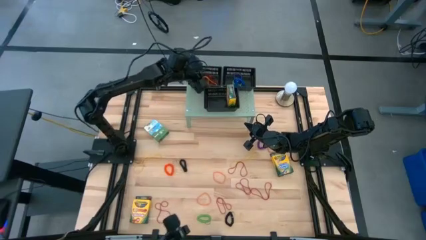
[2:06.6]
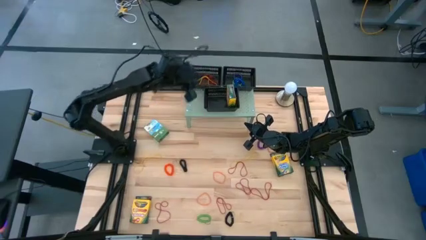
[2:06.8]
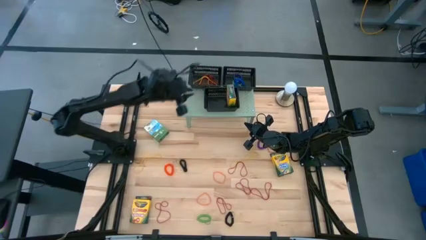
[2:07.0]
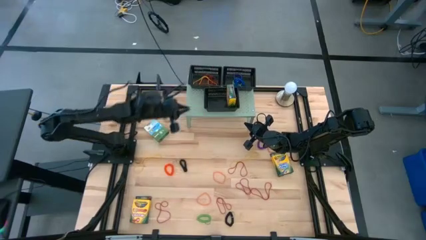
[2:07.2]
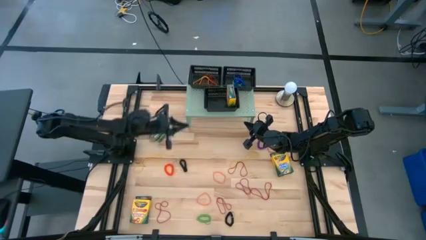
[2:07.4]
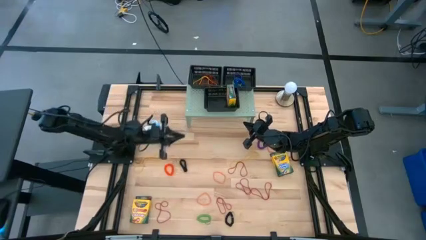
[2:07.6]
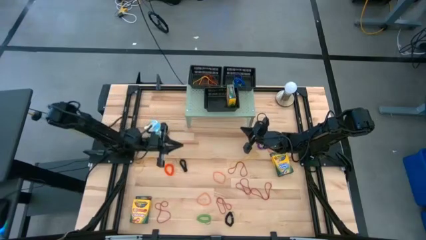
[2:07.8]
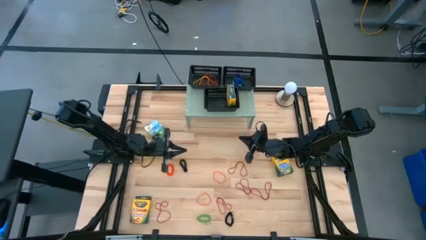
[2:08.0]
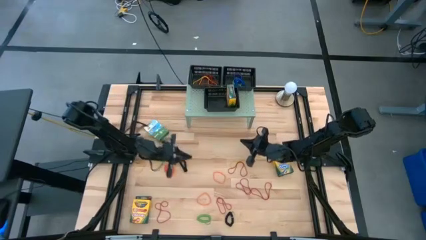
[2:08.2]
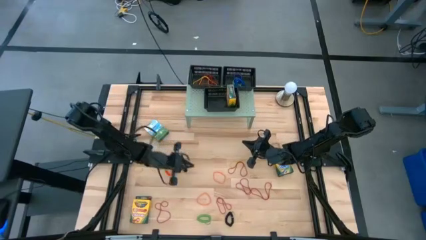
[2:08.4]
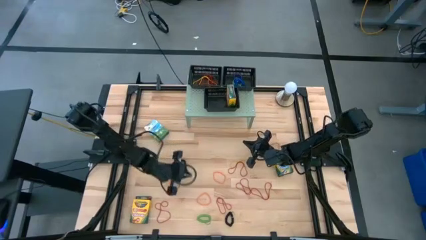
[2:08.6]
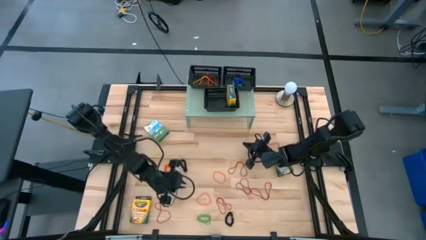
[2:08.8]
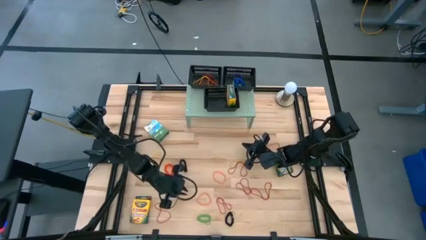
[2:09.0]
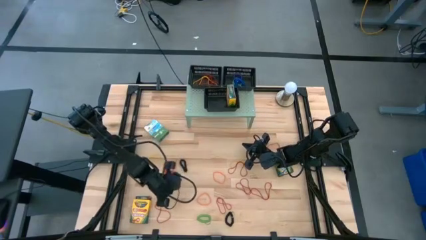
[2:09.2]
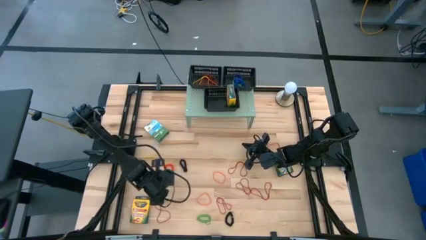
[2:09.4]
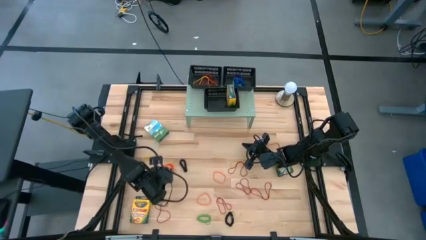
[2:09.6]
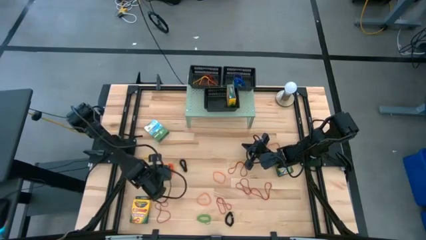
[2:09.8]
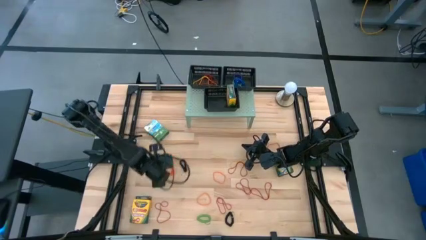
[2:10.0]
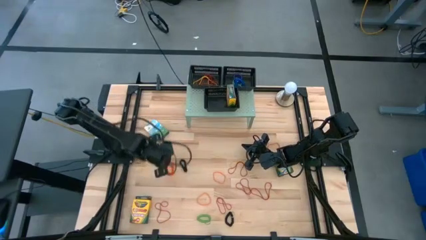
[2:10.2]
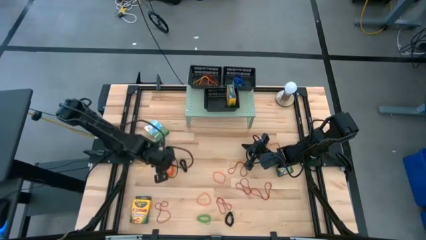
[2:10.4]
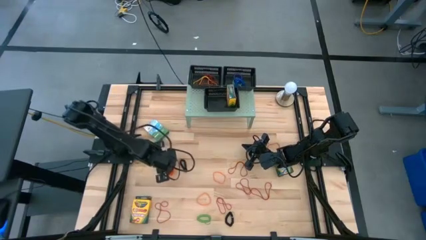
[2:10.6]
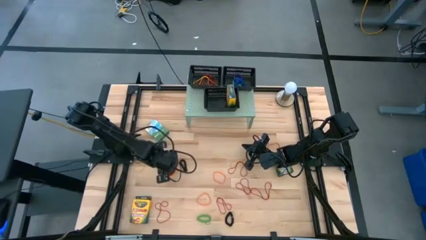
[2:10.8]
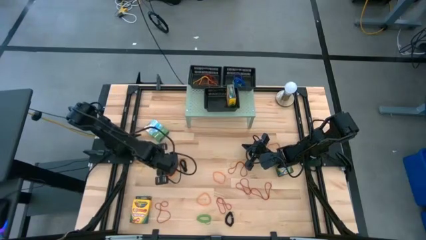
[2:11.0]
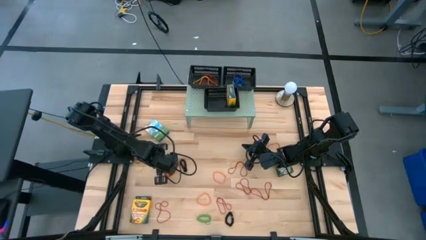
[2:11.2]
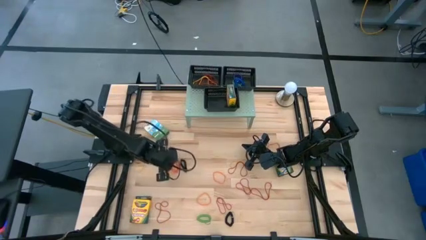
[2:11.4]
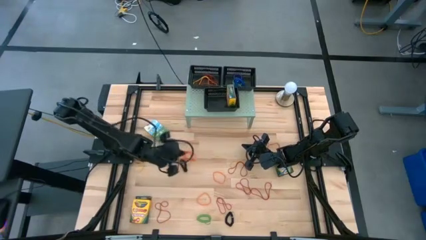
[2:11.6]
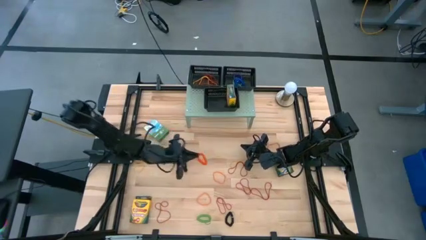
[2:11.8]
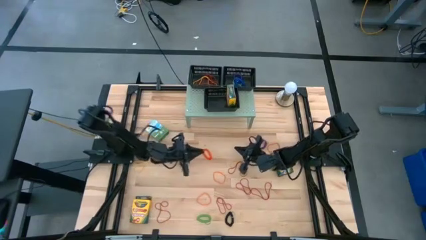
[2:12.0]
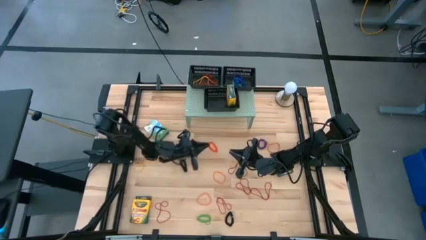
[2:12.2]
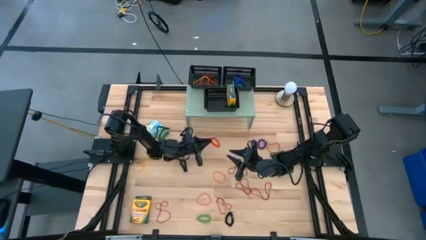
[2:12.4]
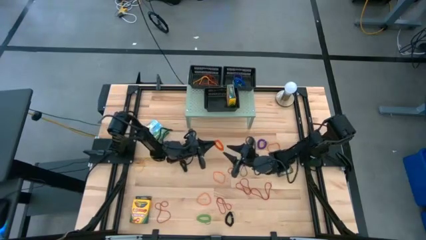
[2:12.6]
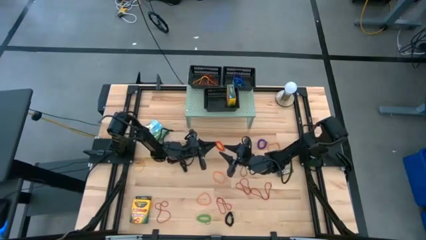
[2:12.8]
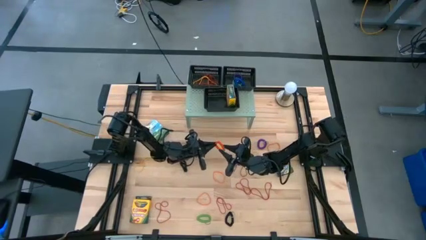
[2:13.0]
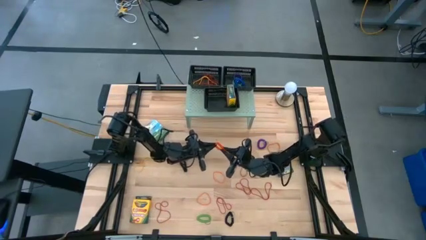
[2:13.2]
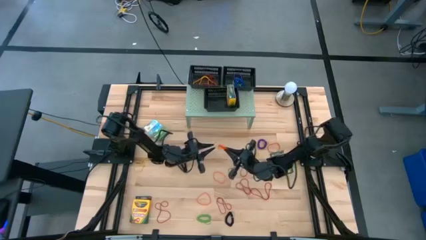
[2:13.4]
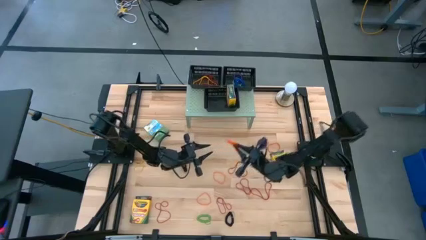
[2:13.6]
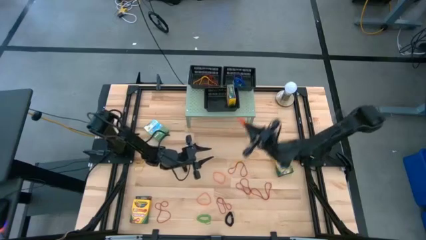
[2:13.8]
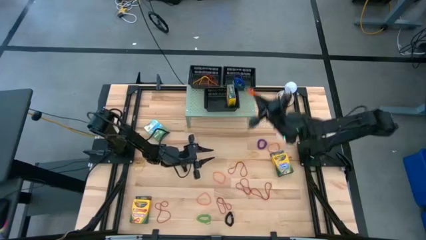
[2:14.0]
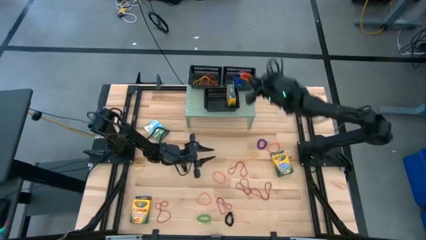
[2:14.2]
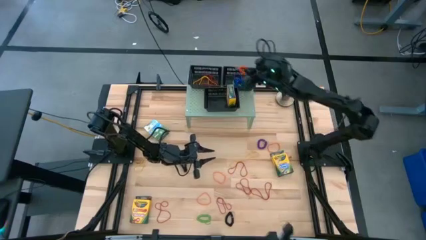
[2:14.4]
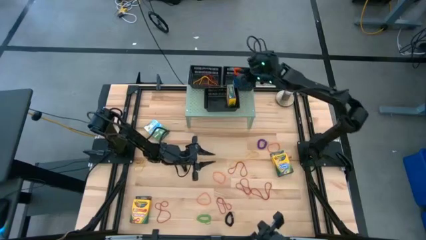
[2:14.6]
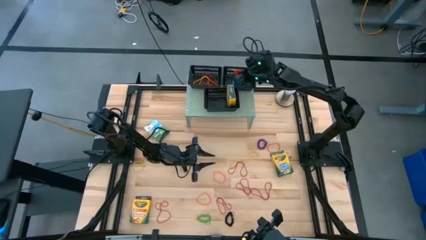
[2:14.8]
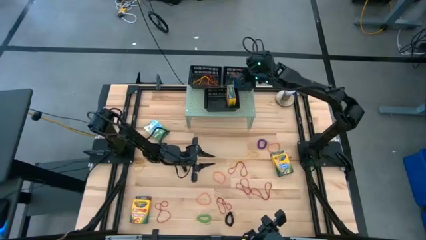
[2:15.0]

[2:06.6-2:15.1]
Task: Pick & Place Office Desk Supplies
Put the orange spiral keychain the top right black bin

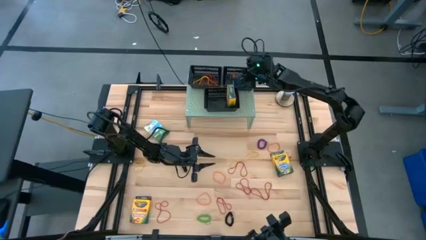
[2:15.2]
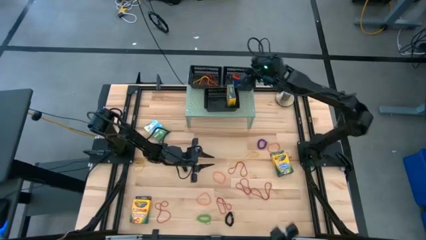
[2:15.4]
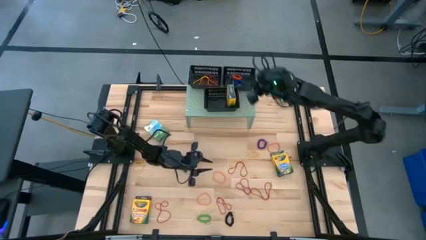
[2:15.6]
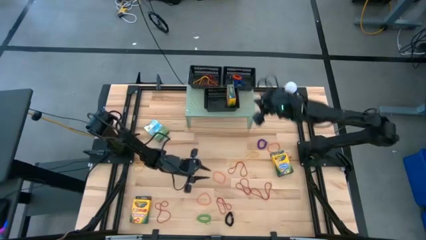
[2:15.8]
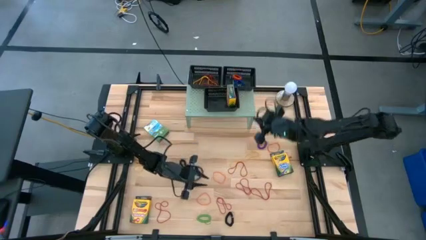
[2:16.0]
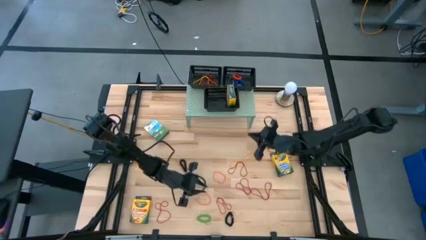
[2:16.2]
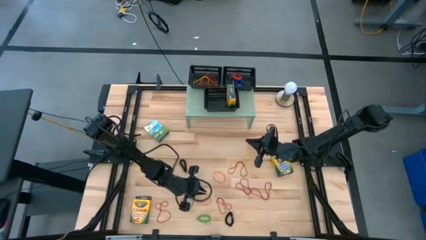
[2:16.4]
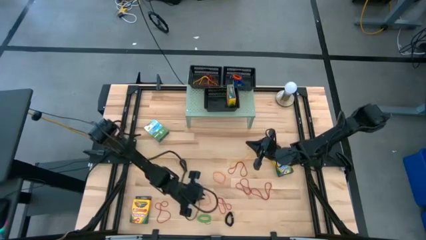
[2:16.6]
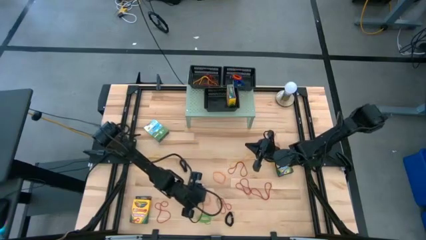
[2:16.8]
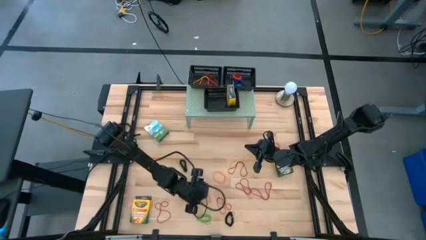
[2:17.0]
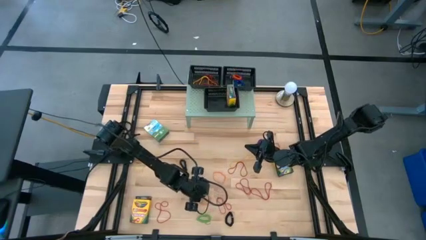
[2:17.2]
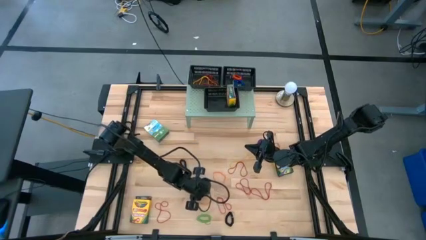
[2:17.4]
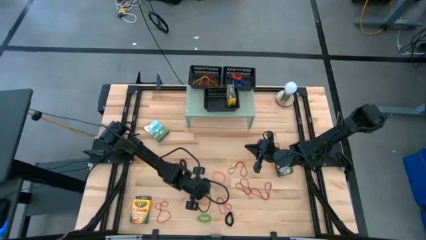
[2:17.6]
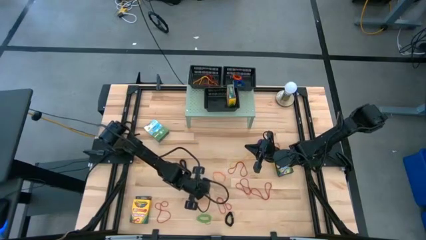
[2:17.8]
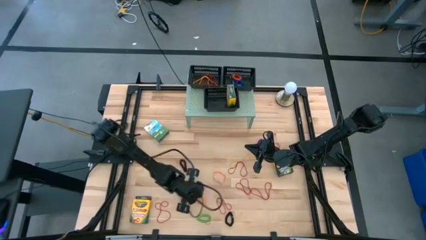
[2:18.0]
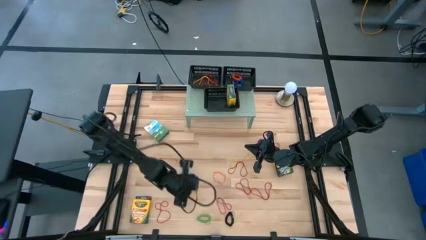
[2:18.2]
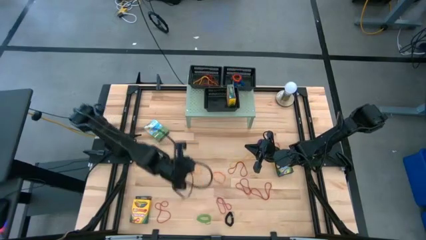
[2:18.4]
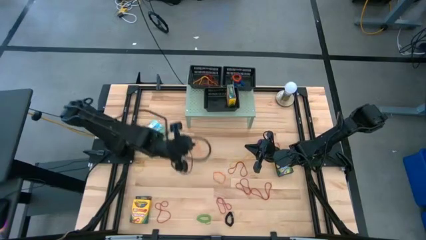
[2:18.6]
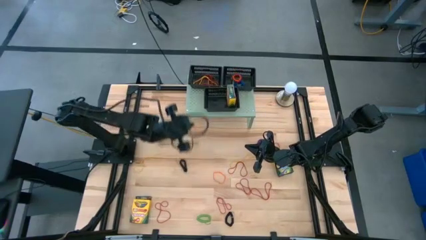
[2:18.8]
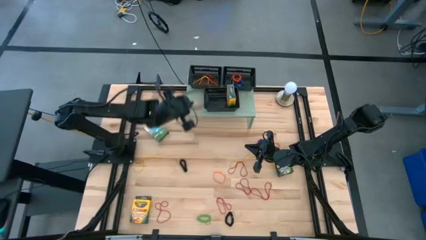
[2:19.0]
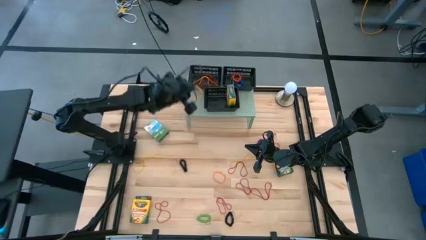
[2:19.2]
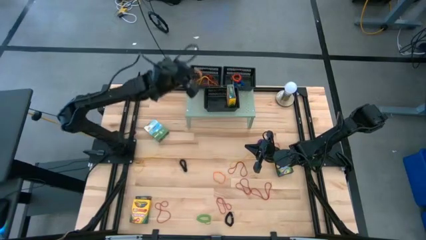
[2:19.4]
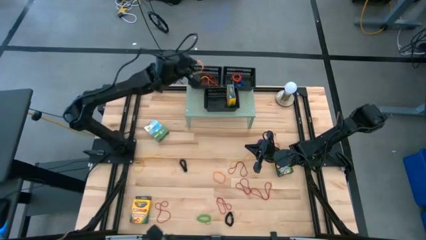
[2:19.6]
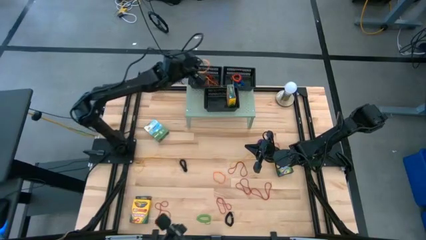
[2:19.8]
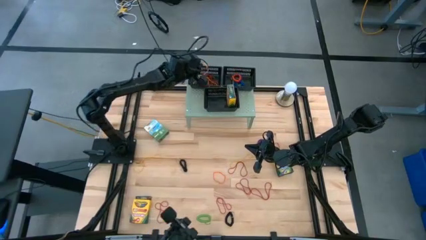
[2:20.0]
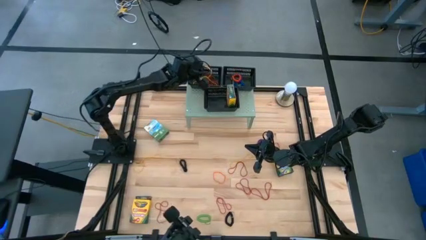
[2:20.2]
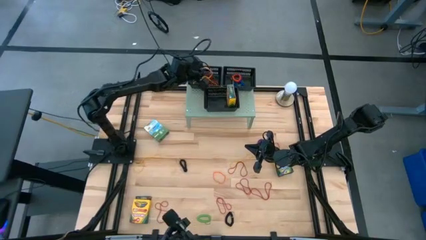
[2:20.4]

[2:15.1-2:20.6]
Put the orange rubberband into the top left black bin
